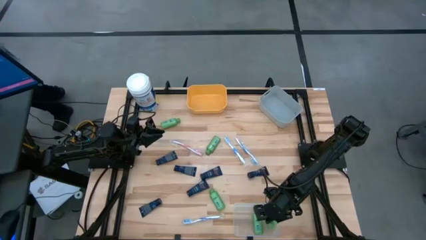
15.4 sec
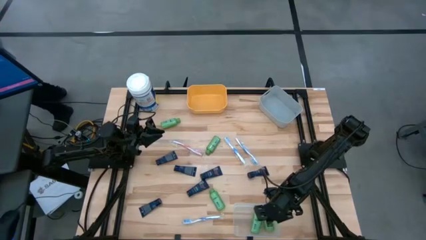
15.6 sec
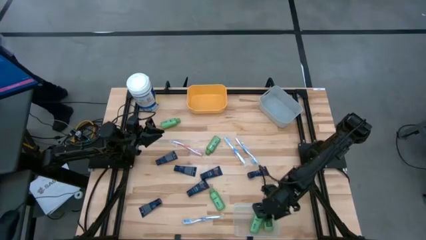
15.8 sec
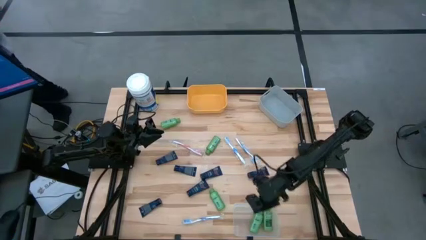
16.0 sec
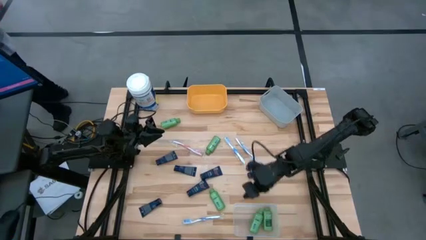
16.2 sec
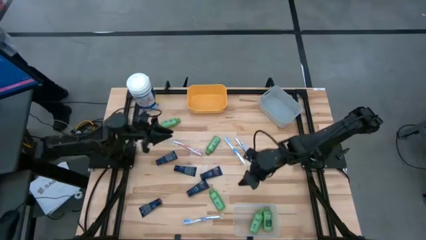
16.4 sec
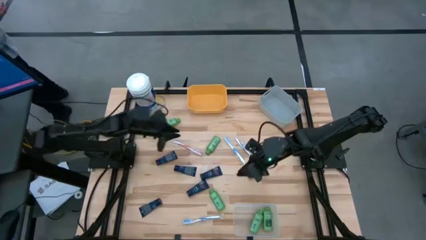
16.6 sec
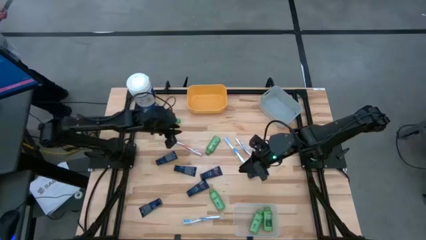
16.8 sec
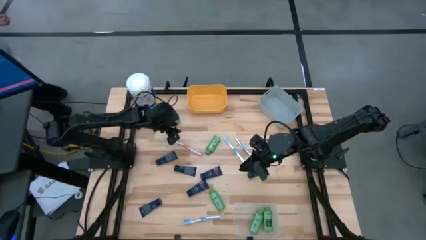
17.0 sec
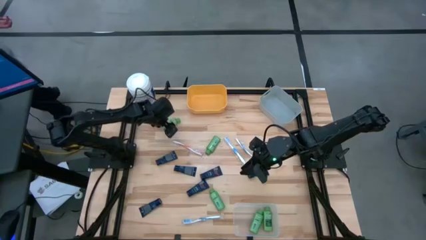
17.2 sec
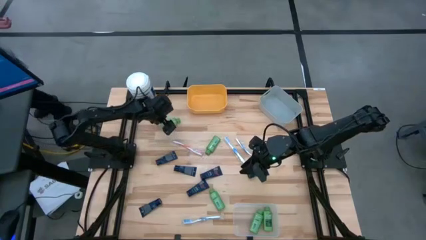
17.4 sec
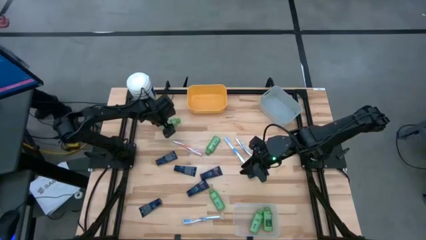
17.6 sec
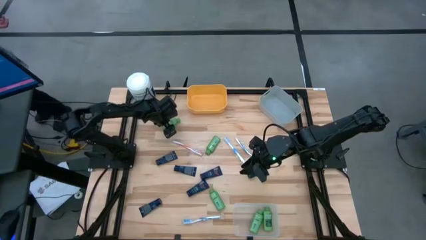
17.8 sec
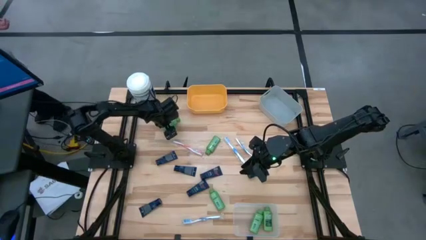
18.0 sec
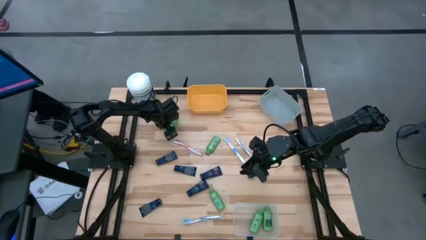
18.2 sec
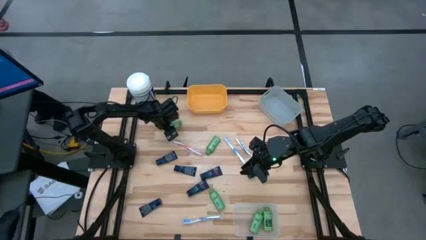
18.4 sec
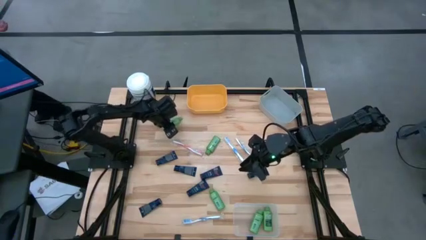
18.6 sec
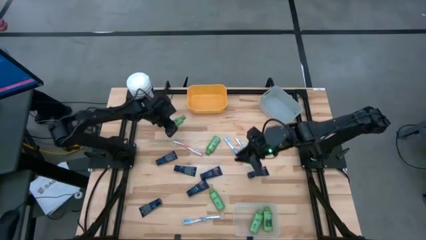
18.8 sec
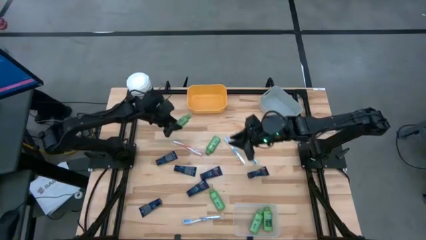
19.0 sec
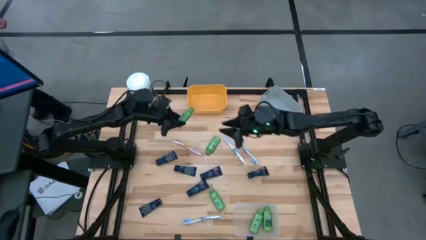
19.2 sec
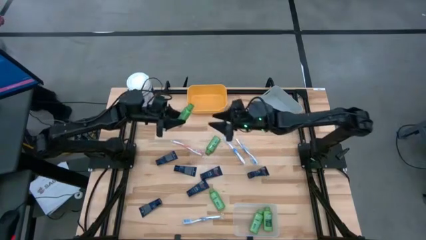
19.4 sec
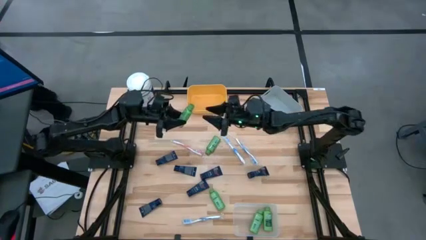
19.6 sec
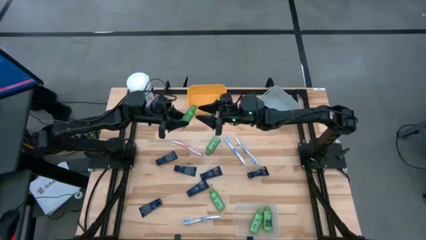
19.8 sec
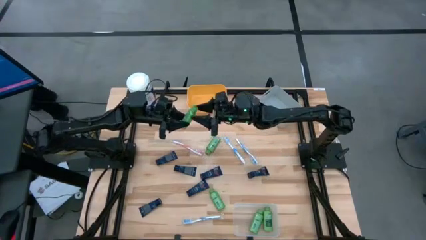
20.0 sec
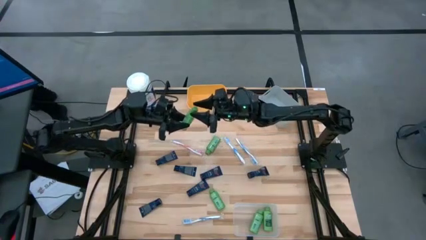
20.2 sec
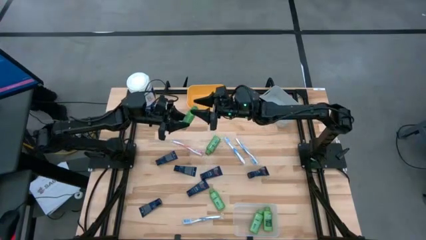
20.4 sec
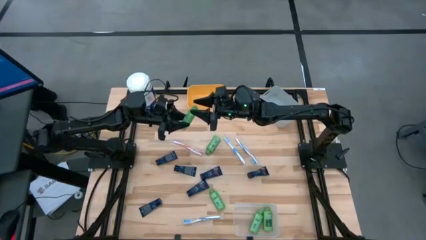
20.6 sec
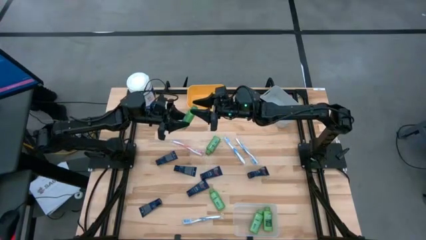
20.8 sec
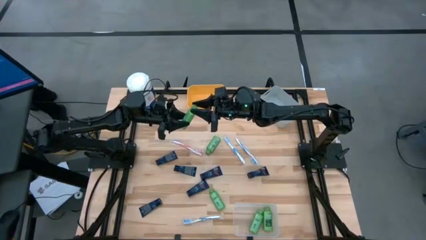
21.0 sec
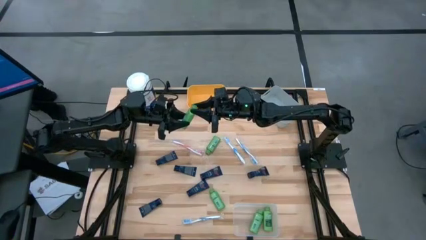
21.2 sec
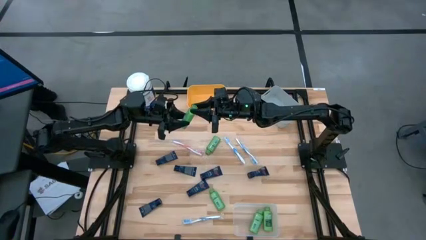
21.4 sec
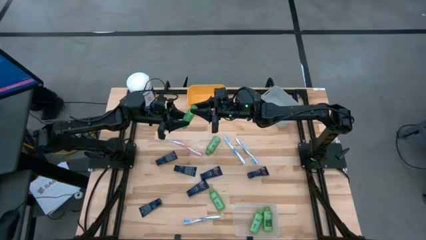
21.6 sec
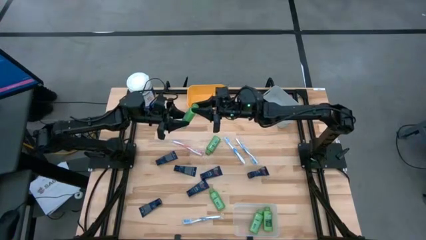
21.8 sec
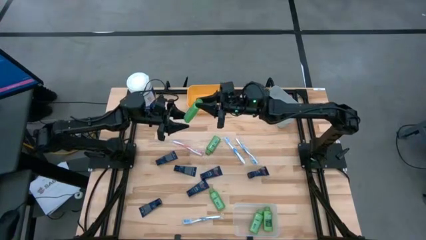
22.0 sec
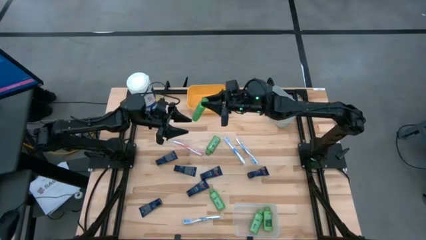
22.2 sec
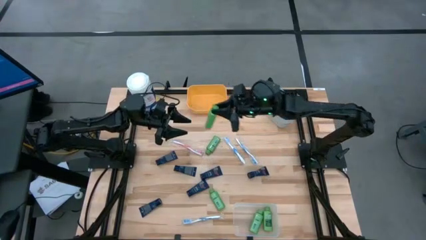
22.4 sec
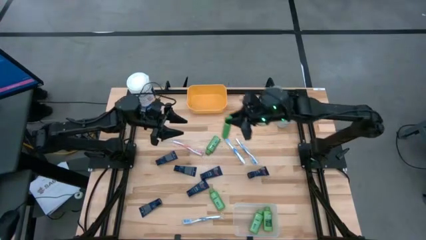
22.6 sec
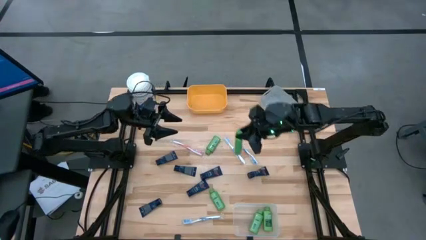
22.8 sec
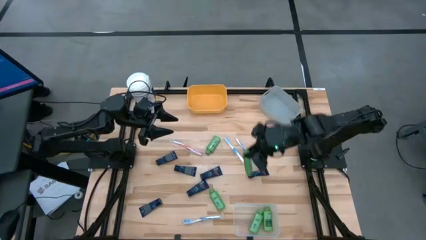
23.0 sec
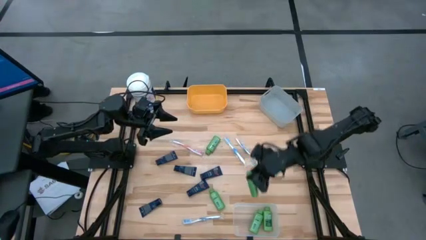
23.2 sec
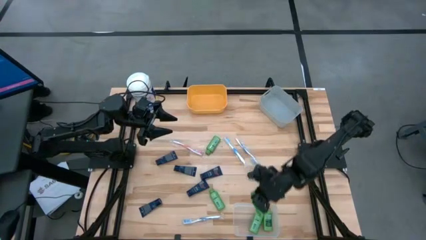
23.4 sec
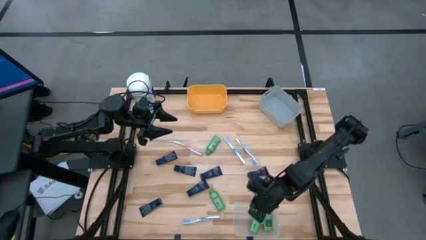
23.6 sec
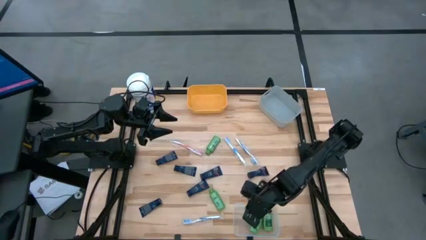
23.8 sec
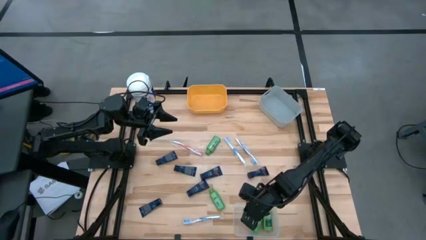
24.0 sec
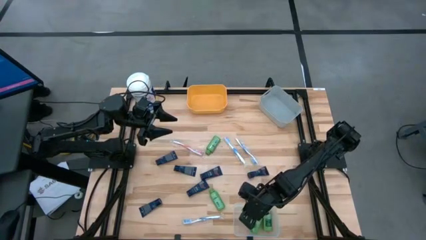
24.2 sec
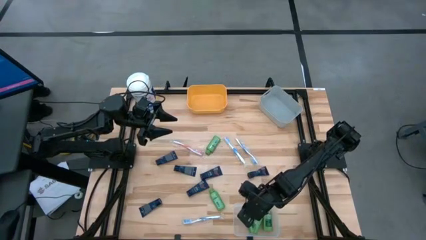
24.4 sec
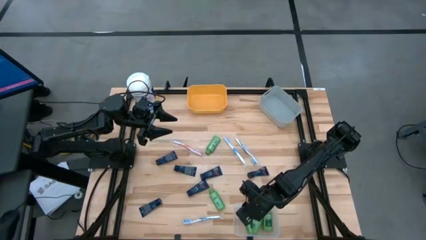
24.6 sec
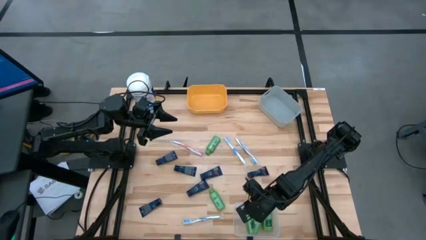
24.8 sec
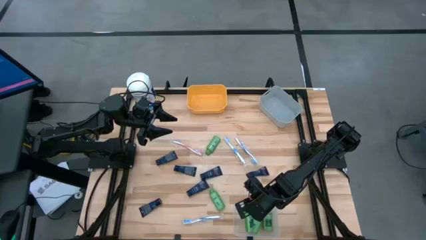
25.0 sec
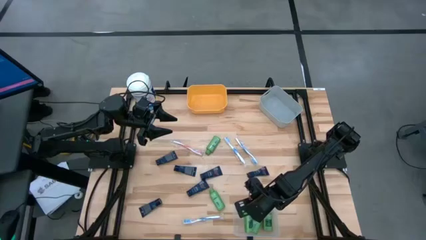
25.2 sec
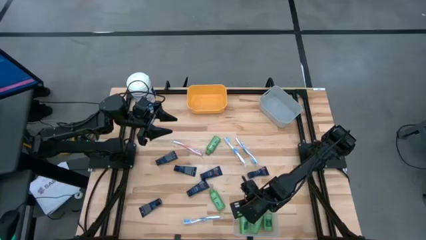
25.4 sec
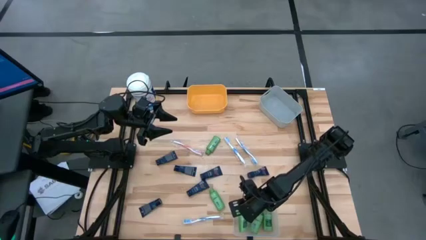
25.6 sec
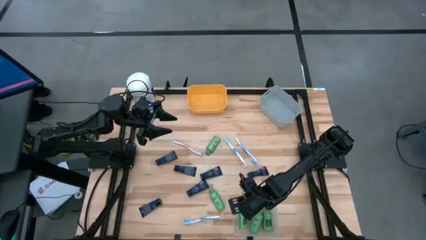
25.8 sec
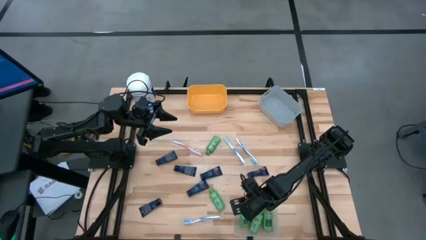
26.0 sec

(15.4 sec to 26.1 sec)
Task: Pick & Place Travel size toiletries
Put the green shampoo into the transparent bin

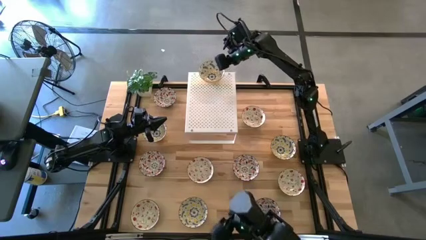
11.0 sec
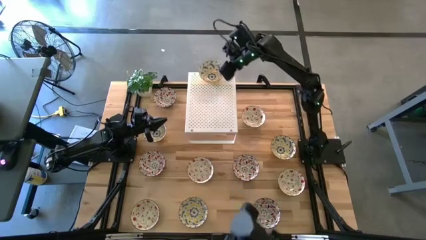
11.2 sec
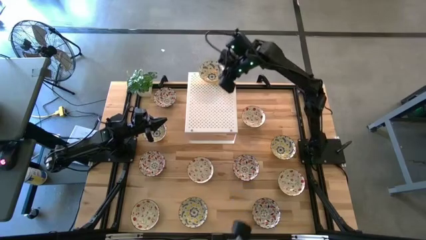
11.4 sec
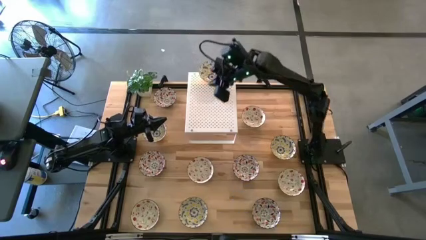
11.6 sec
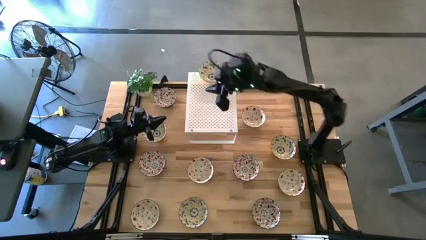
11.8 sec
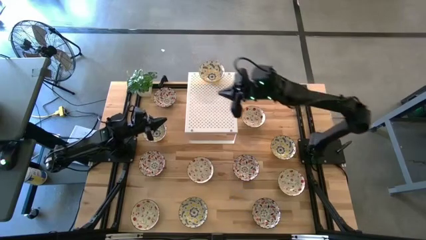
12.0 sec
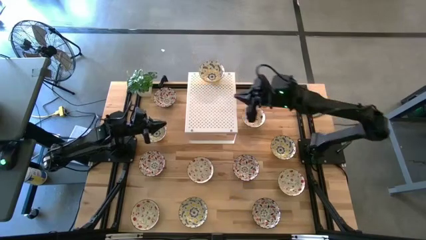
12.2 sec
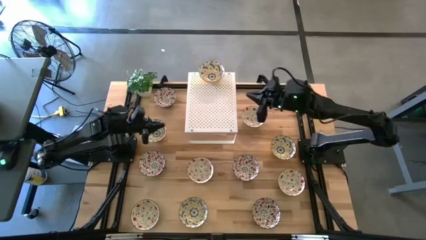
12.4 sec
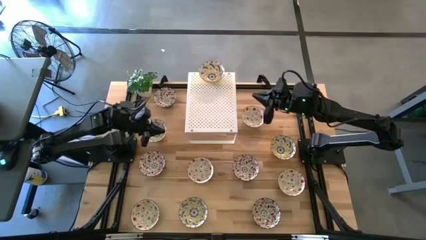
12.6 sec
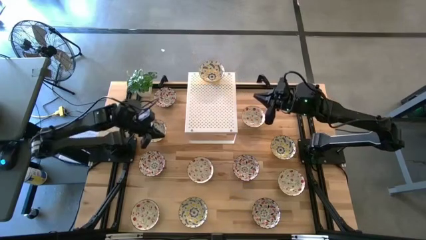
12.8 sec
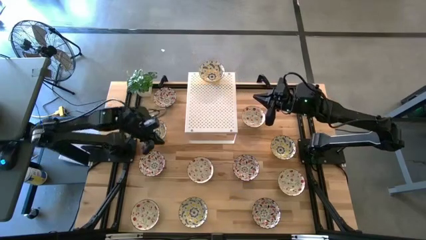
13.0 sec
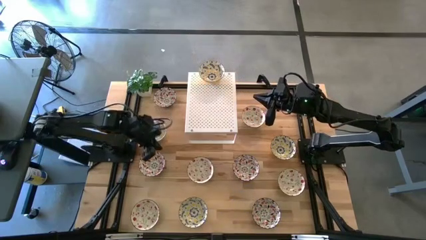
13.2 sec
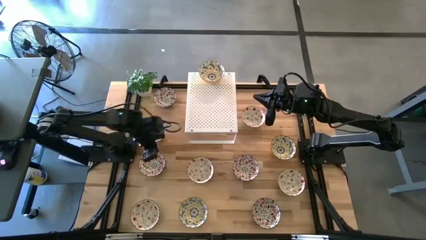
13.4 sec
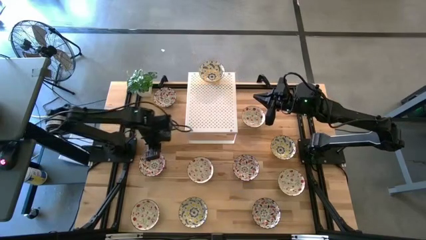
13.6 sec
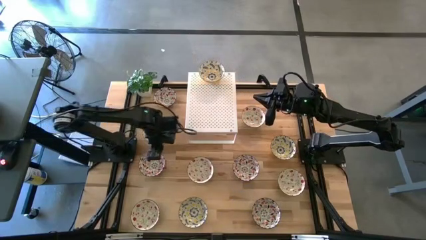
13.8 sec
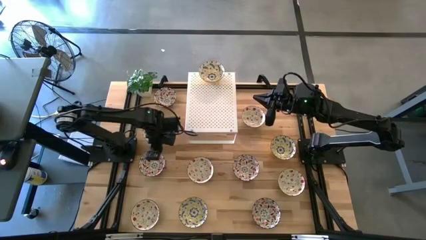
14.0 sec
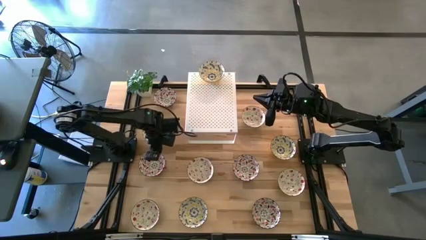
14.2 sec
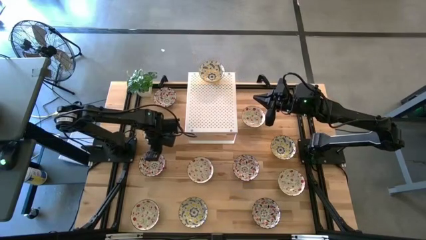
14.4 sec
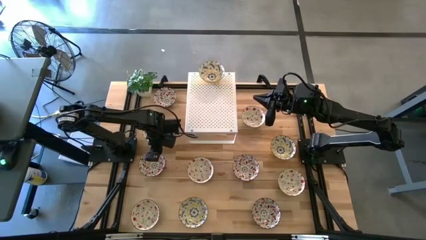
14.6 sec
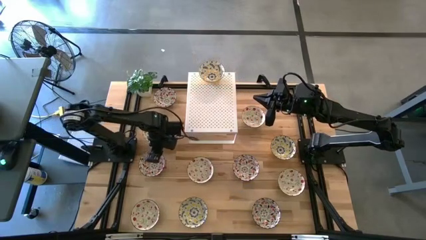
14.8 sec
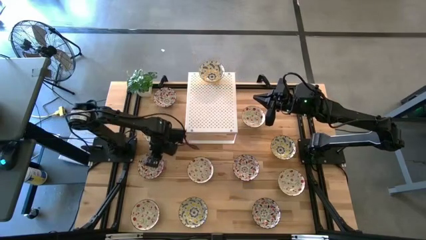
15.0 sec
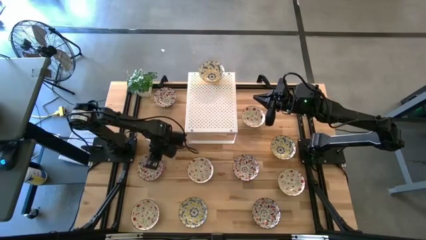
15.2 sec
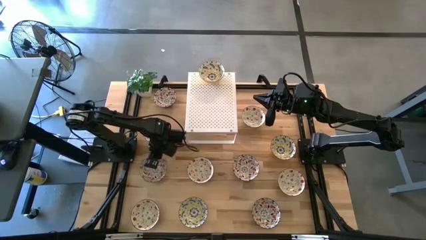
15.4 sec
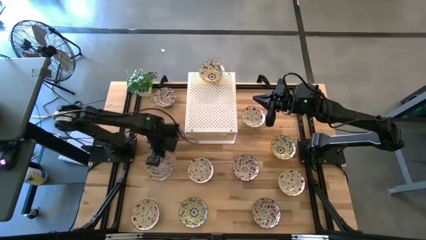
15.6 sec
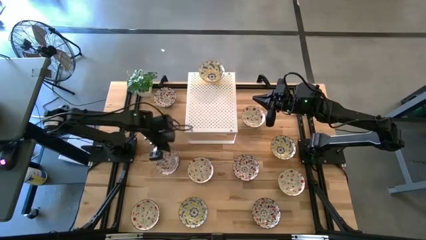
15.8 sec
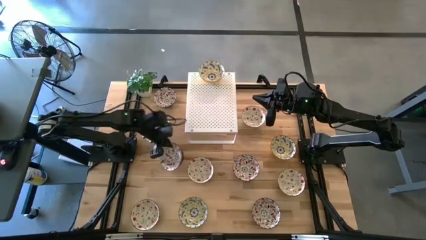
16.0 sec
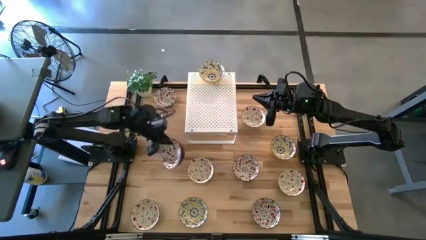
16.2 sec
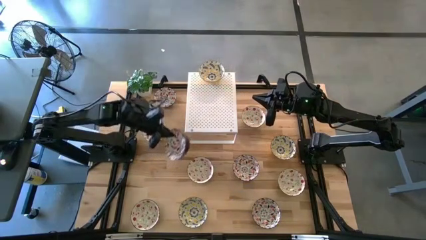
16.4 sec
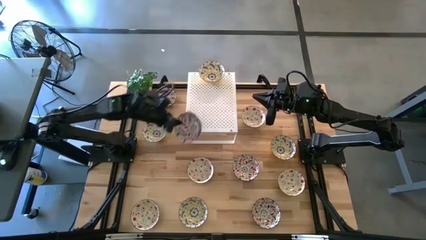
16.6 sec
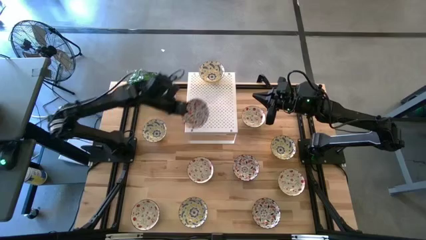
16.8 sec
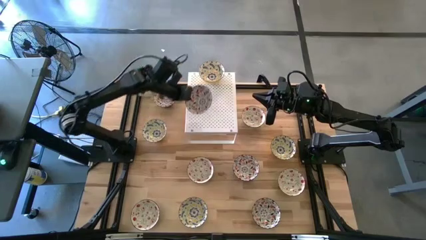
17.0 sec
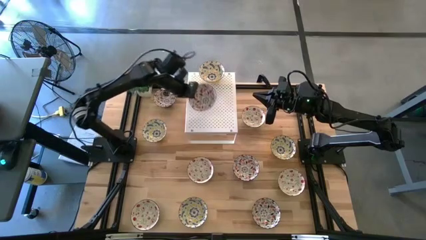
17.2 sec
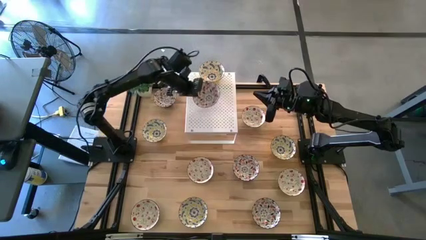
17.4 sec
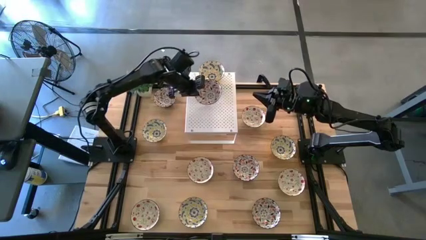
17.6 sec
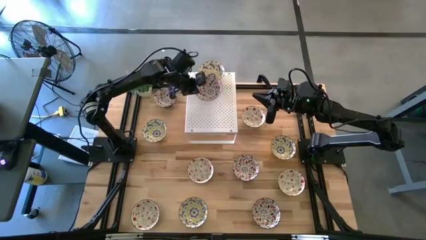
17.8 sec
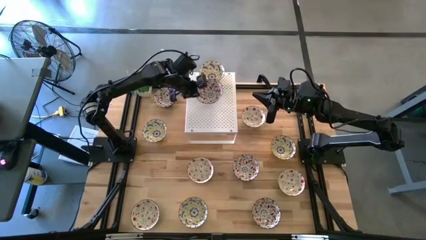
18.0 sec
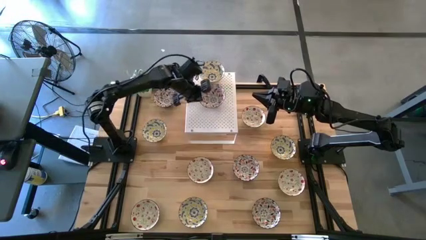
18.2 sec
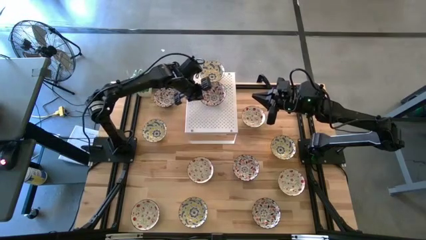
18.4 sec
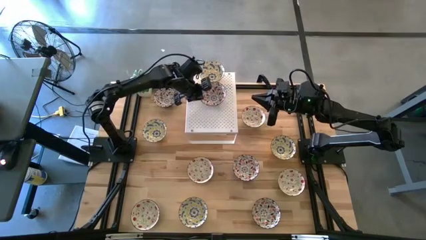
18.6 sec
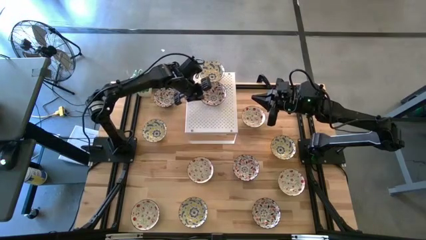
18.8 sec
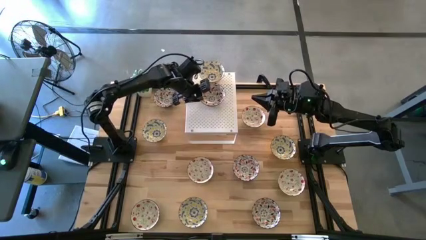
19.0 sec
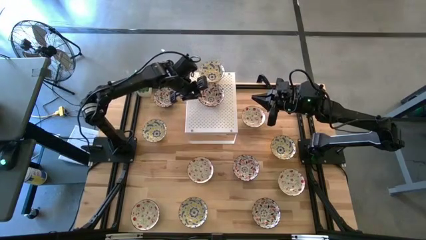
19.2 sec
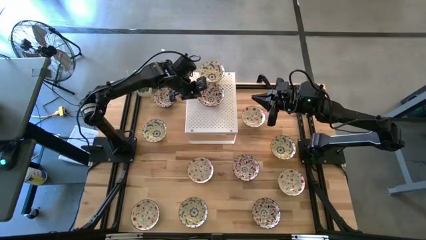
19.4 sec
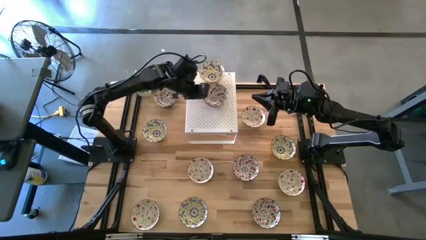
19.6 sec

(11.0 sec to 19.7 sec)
Task: Pick & Place Mini bowls
Put the orange patterned bowl on the shelf
